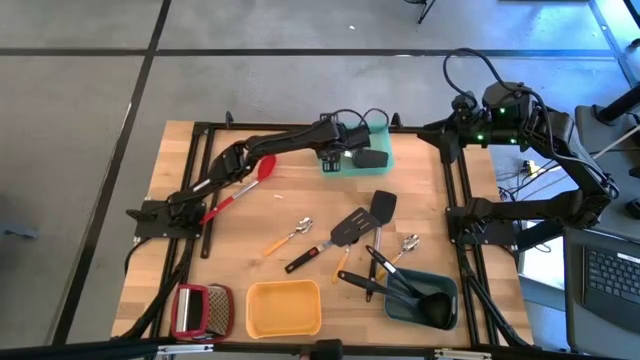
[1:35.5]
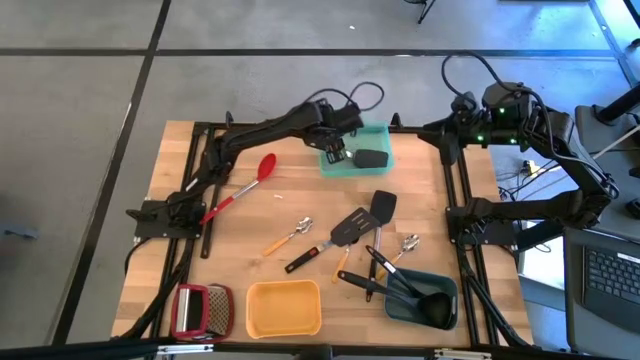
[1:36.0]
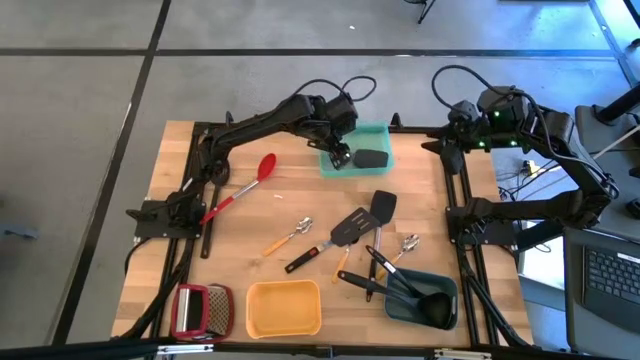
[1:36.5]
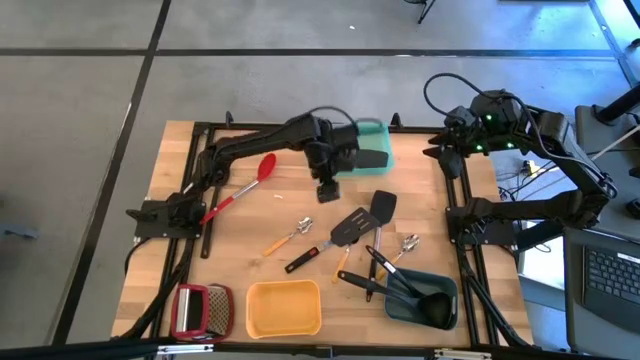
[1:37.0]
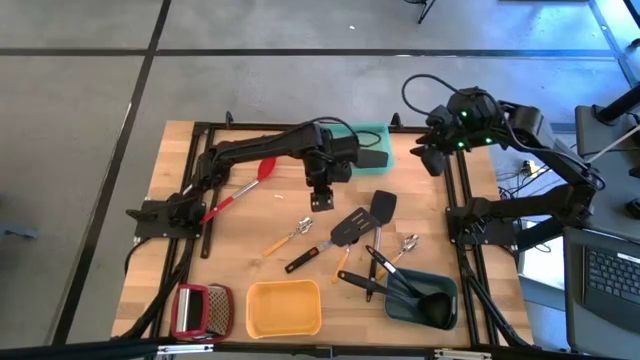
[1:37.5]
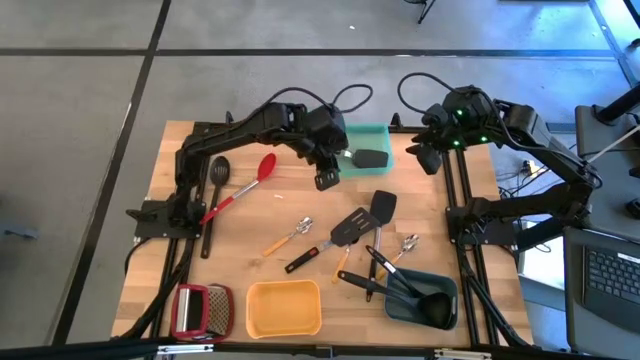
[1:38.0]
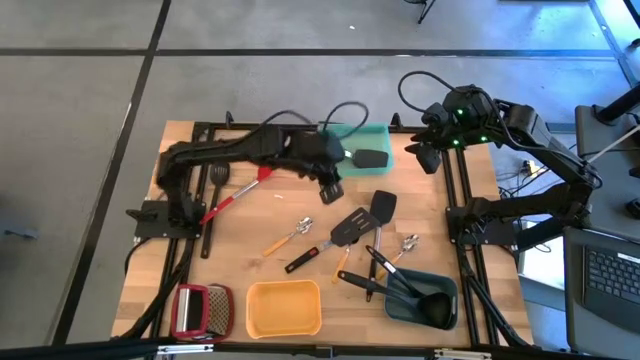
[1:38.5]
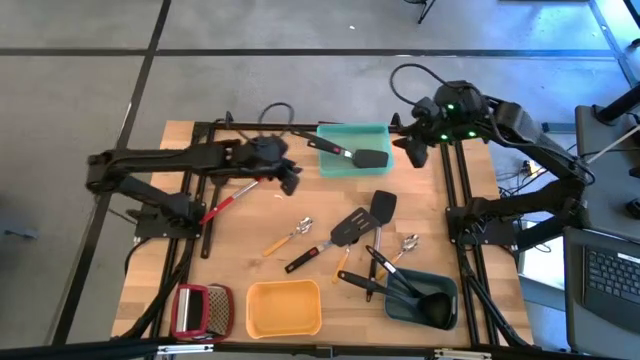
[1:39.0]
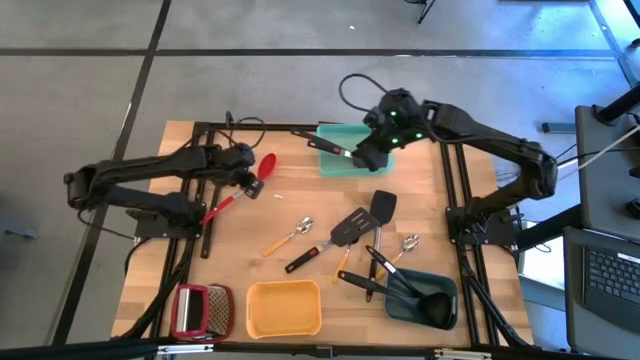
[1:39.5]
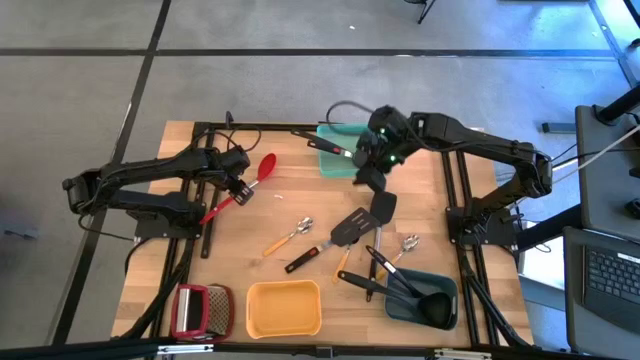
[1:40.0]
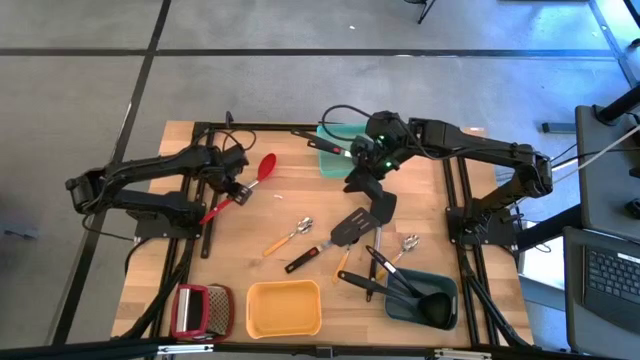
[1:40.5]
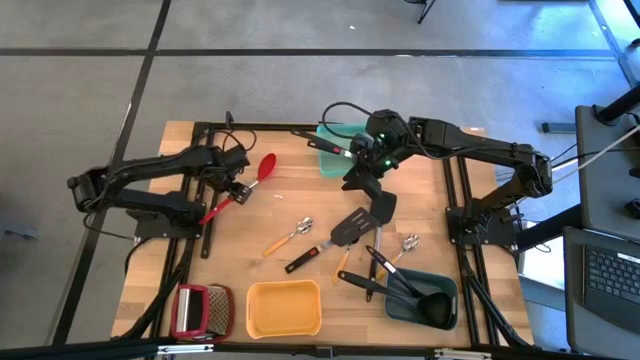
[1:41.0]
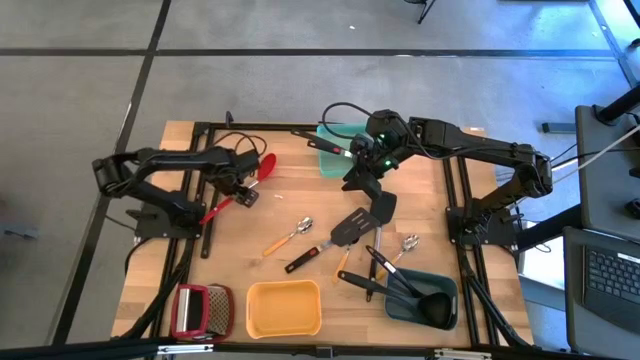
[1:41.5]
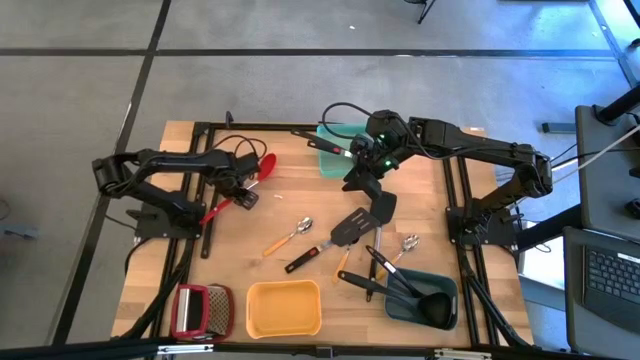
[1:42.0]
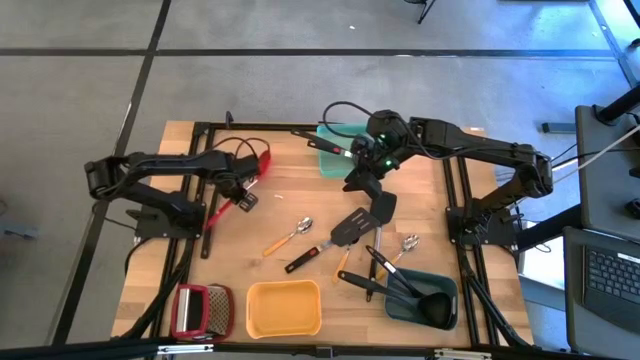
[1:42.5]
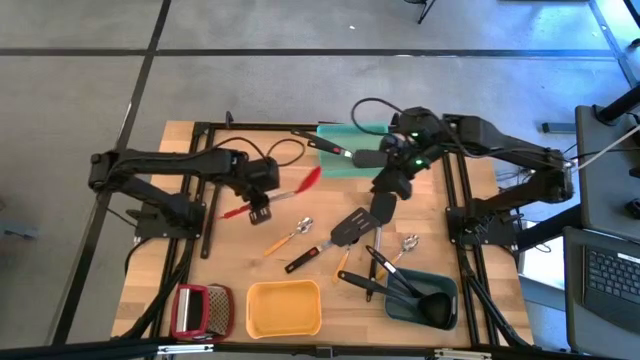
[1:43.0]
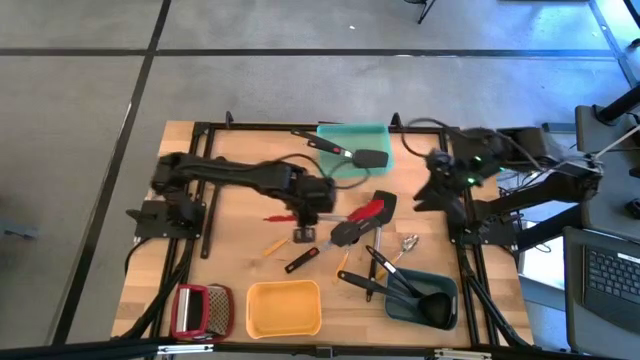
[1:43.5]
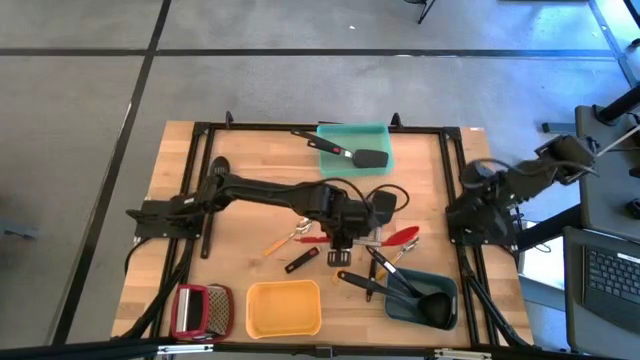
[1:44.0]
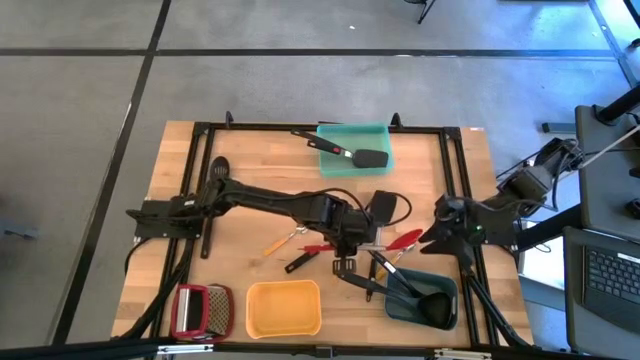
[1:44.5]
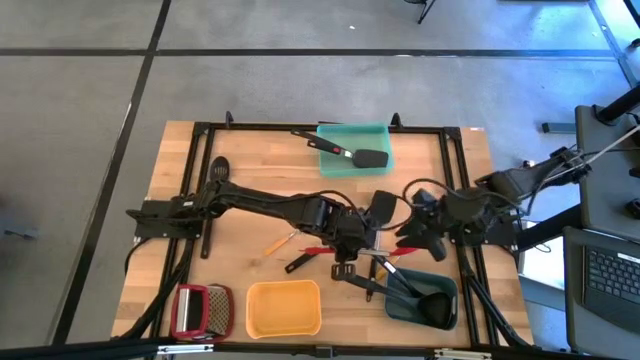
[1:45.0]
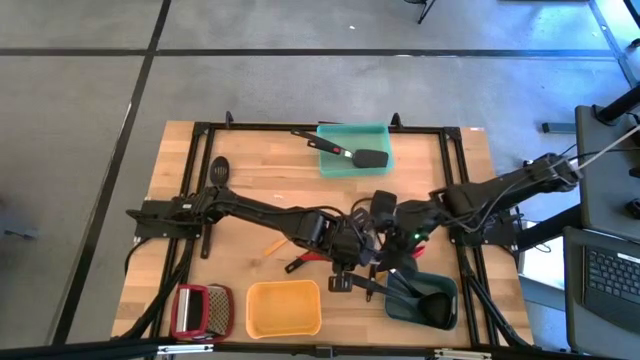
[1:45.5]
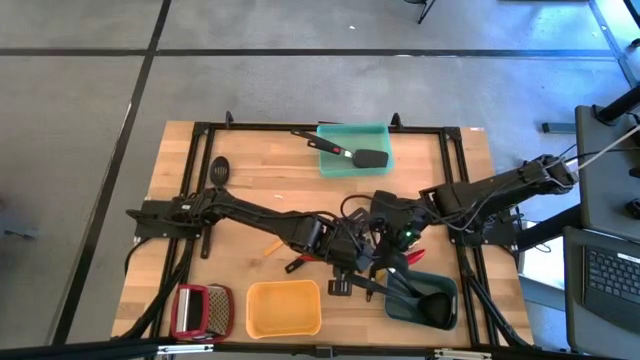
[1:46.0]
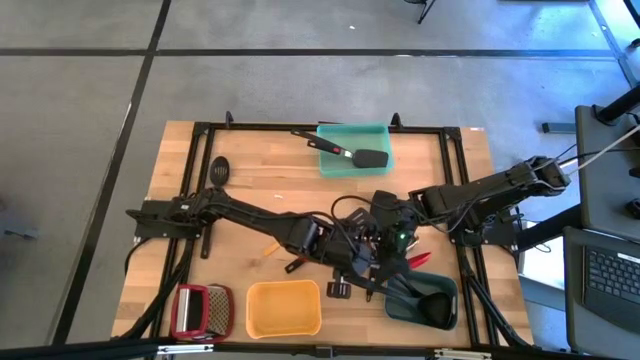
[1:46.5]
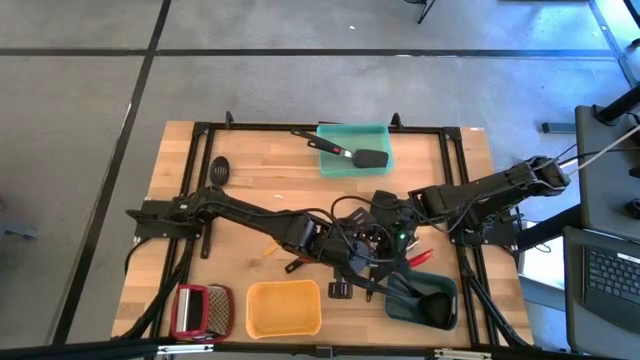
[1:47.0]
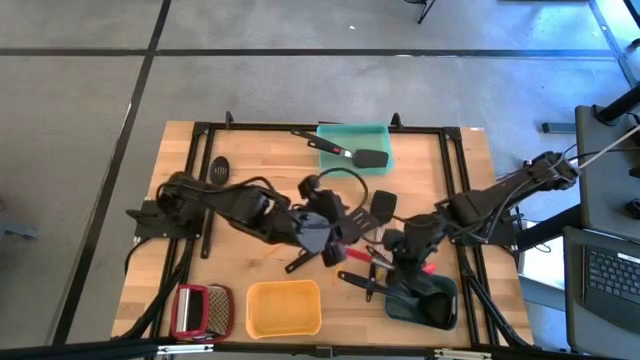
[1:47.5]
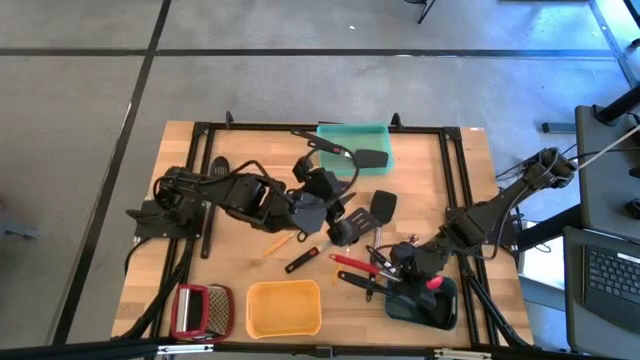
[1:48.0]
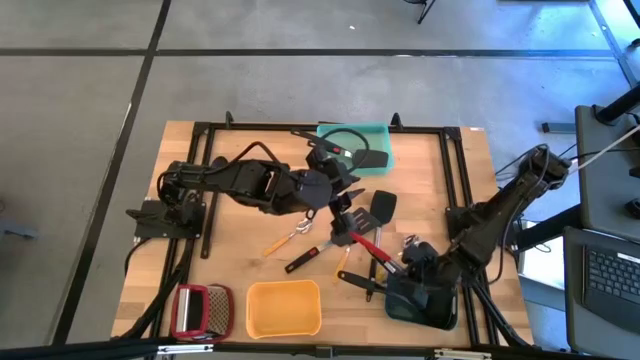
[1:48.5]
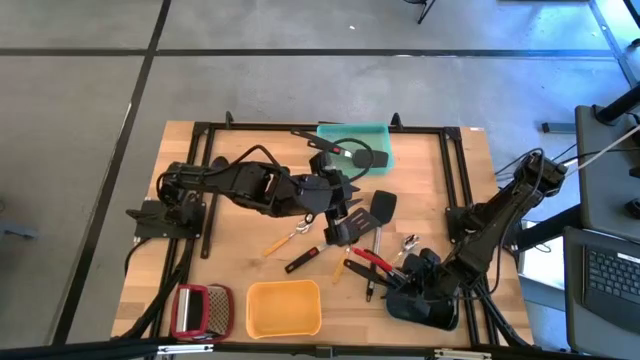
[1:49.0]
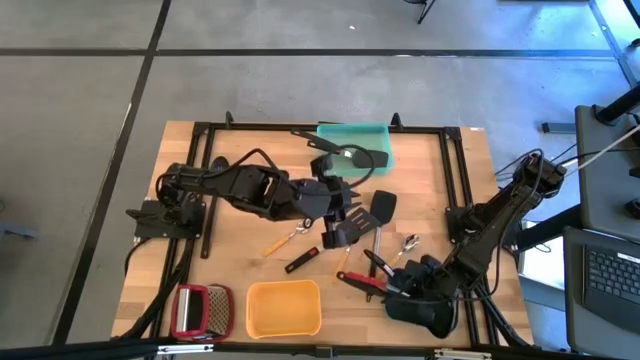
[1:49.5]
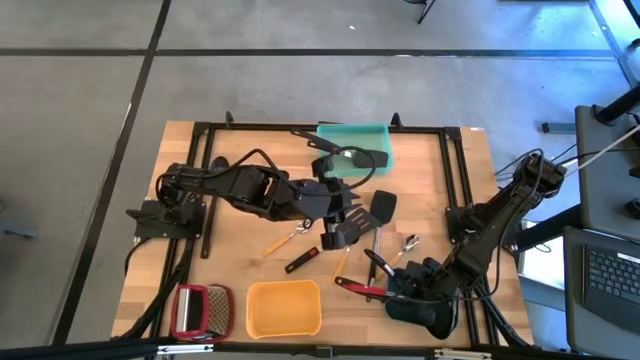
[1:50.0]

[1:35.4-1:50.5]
Task: Pick & Place Kitchen Items
Put the red serving spoon into the blue bin

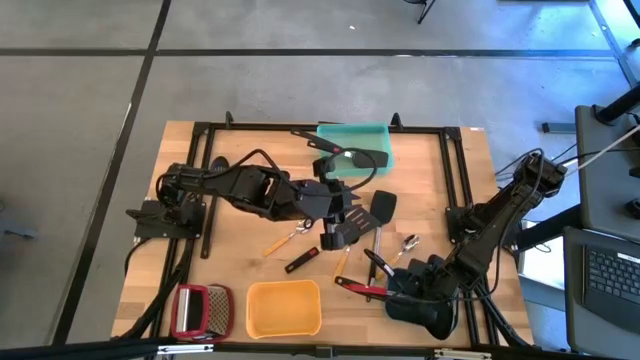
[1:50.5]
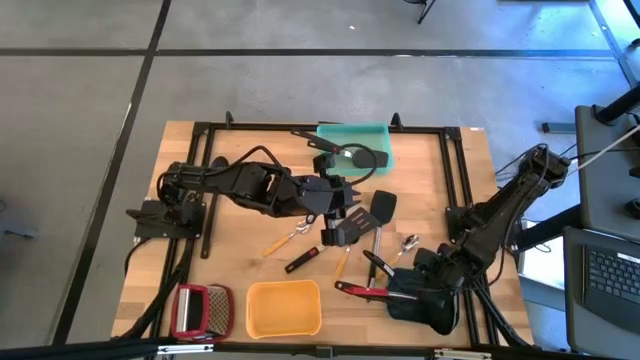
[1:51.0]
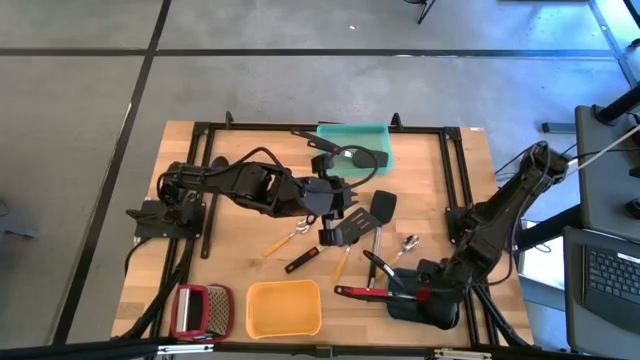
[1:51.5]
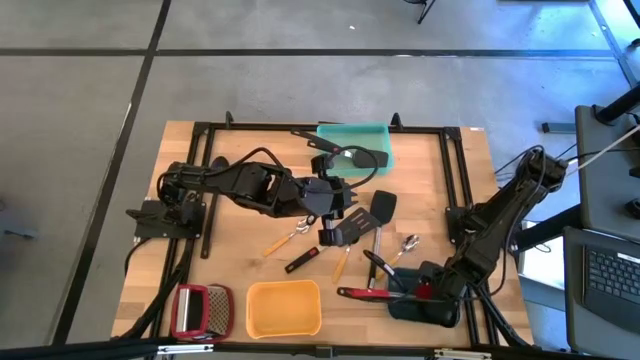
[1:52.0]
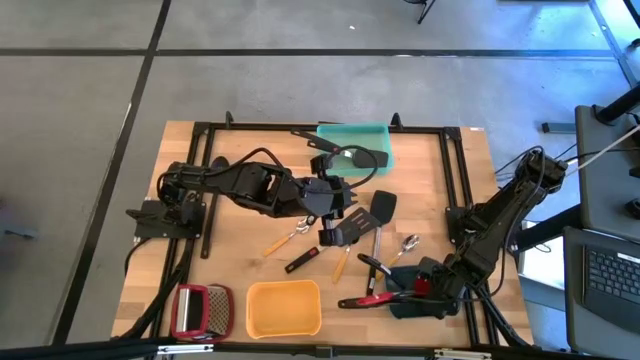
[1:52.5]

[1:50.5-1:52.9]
Adjust the black serving spoon in the blue bin

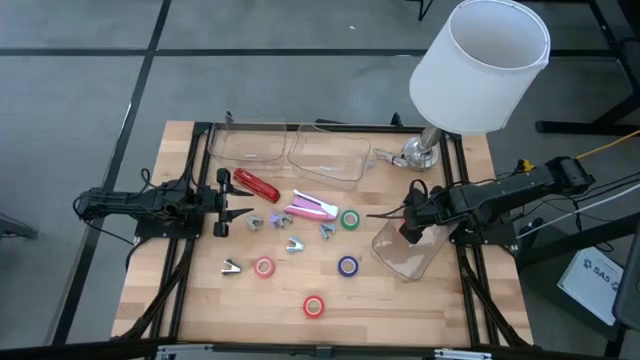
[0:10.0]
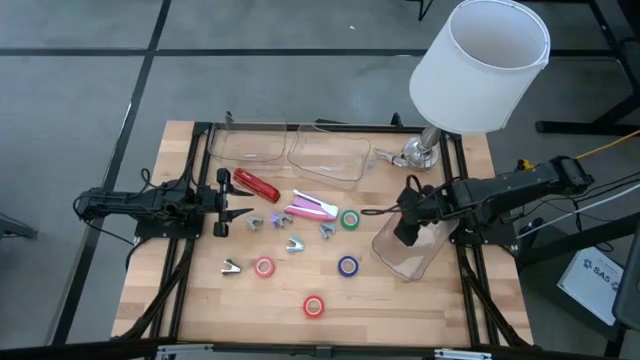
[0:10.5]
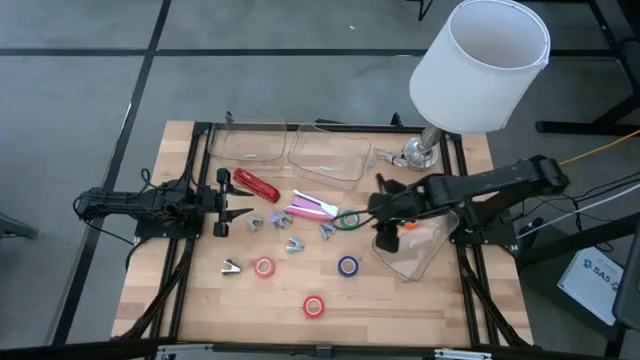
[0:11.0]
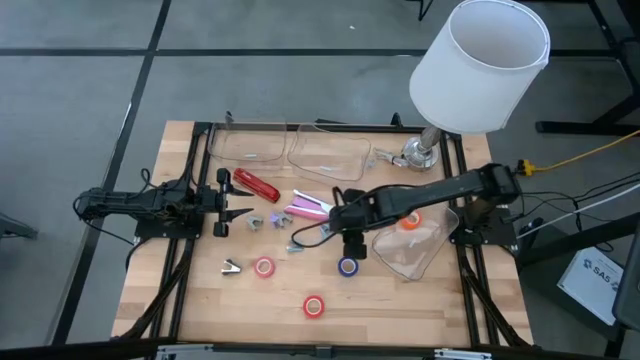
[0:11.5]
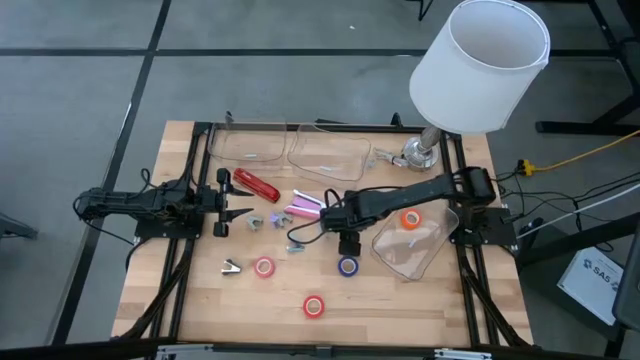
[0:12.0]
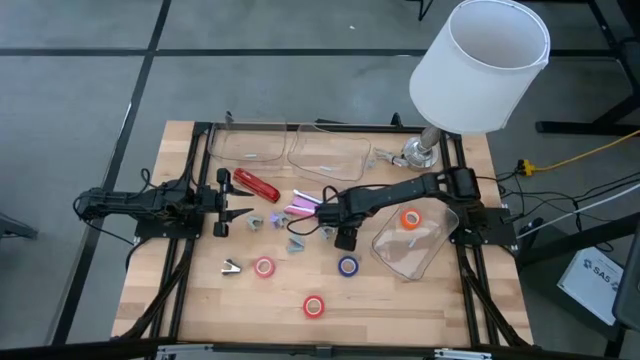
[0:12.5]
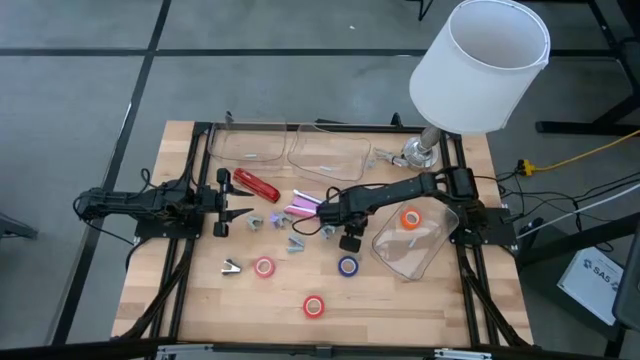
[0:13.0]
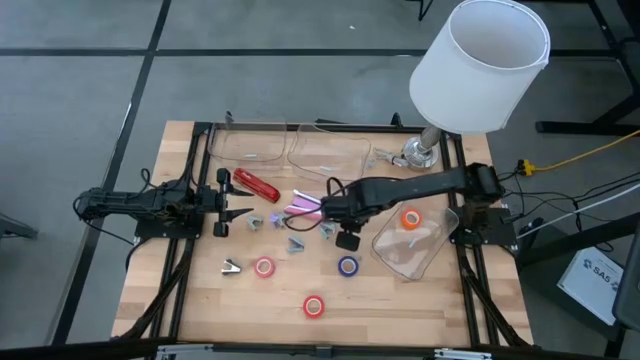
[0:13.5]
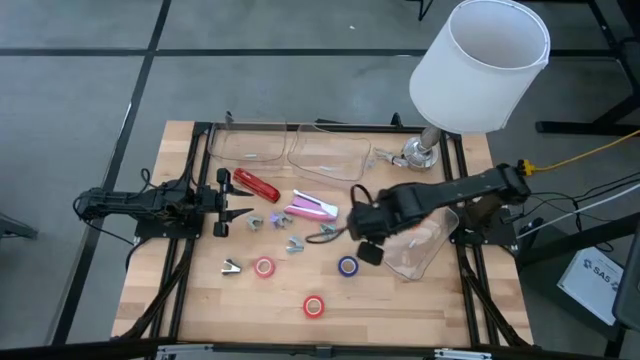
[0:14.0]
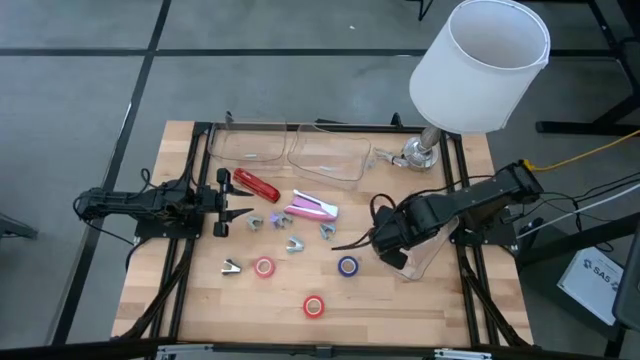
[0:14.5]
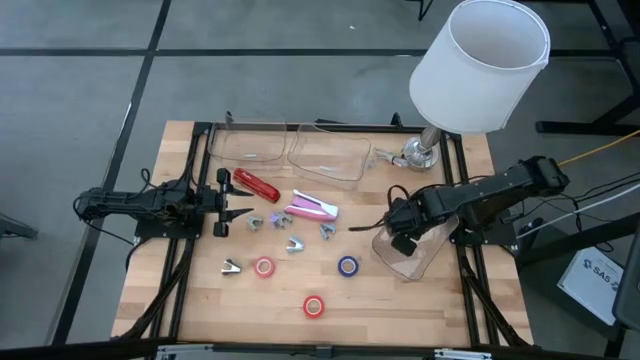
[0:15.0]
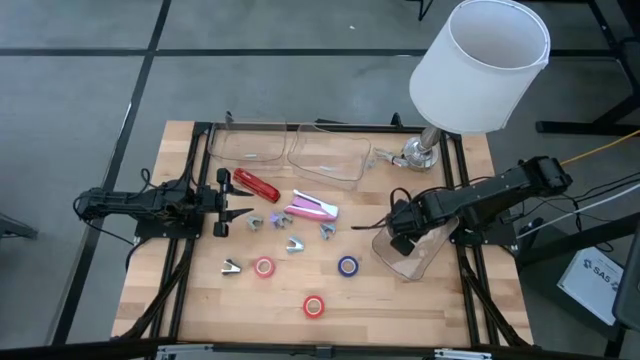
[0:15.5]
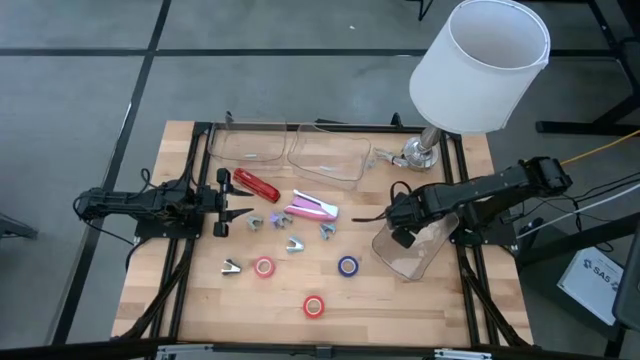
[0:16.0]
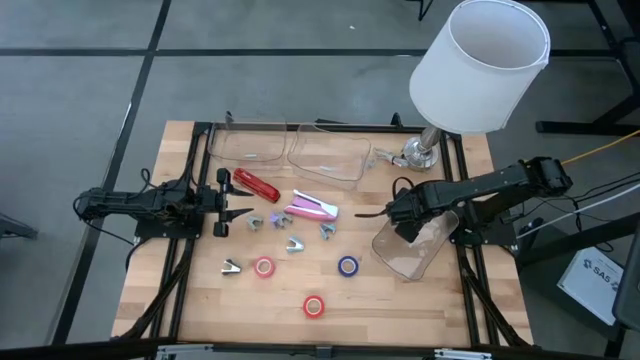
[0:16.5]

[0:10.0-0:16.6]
Task: Pick and place Stapler, Stapler remover, tape
Put the green tape into the bottom transparent bin
